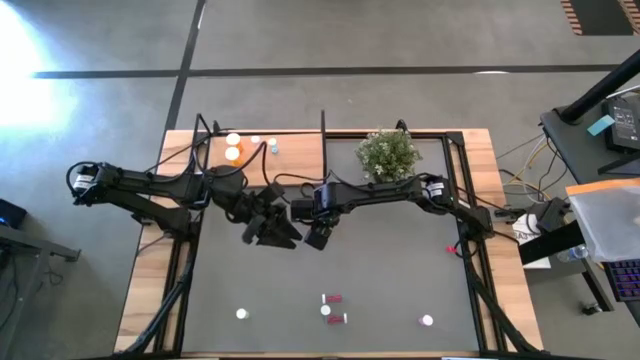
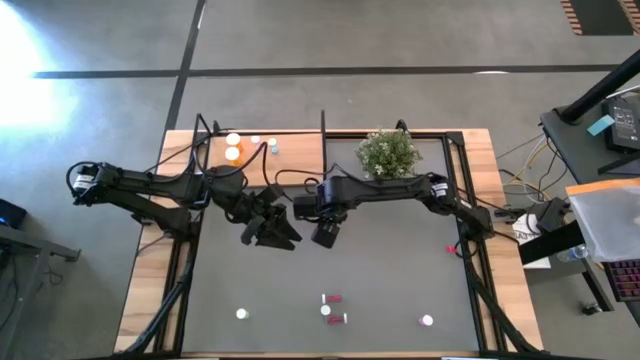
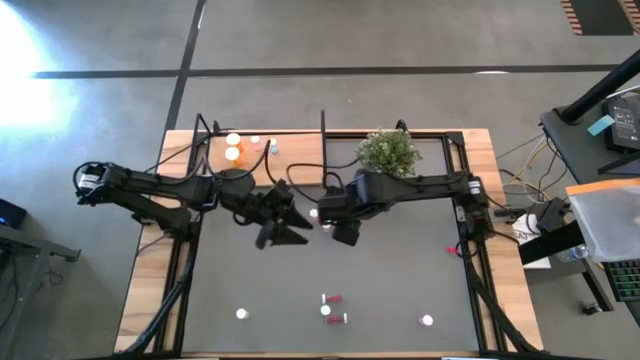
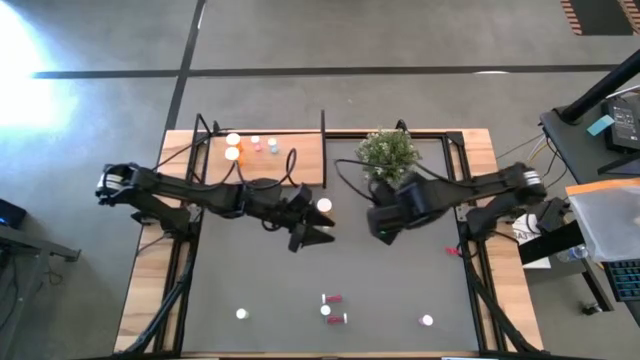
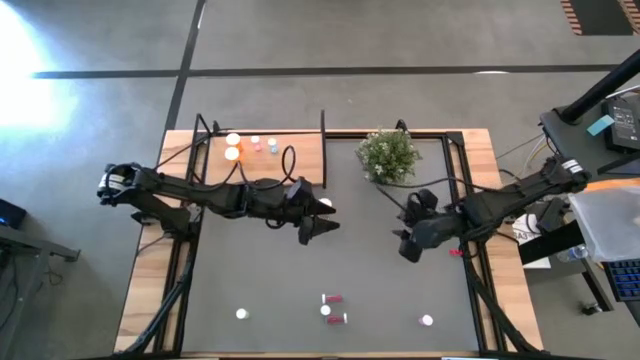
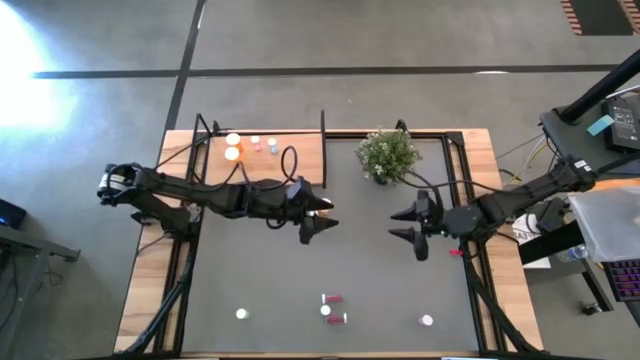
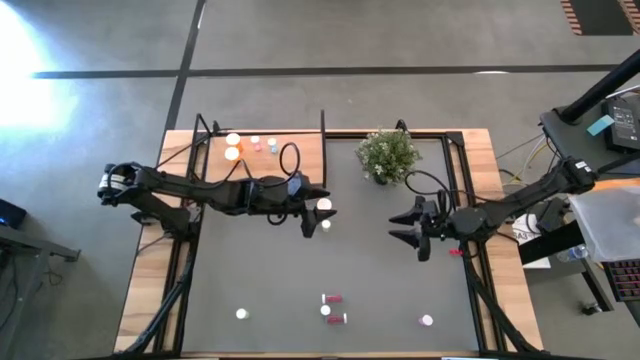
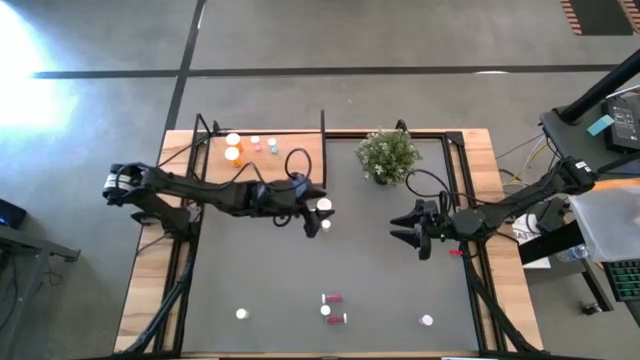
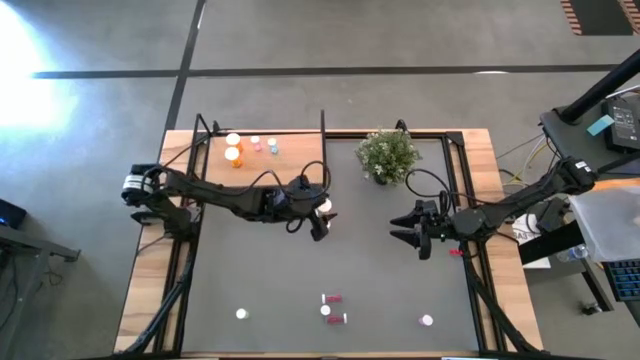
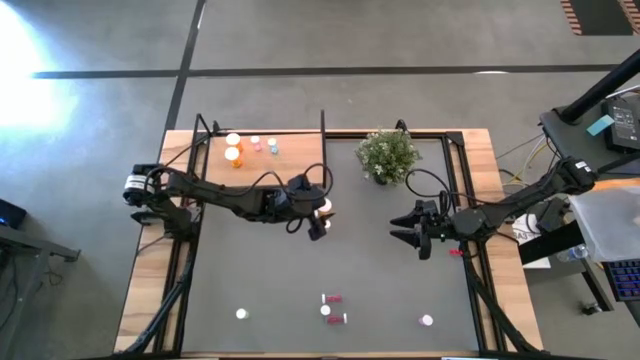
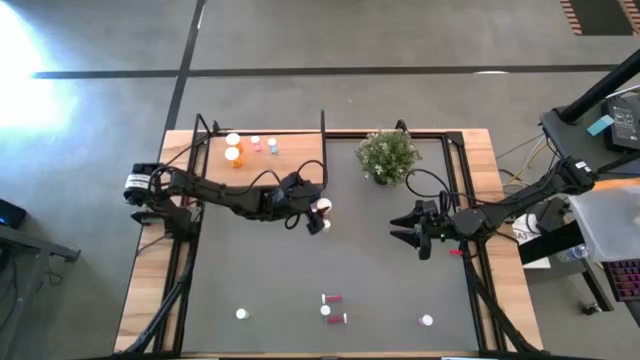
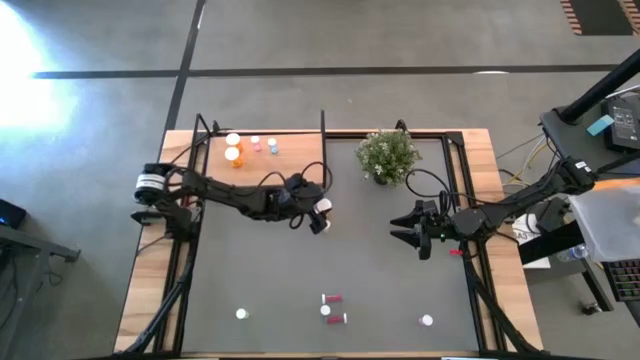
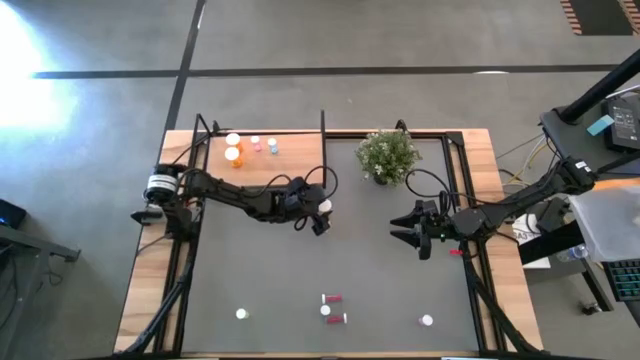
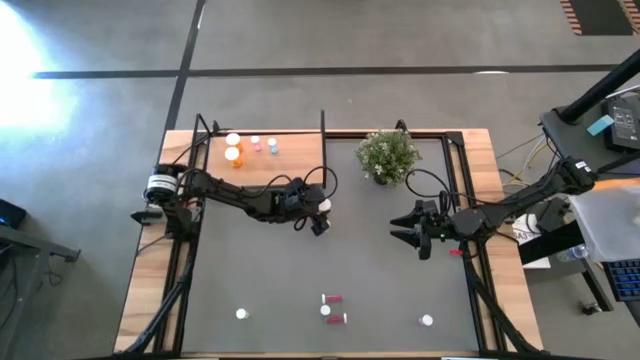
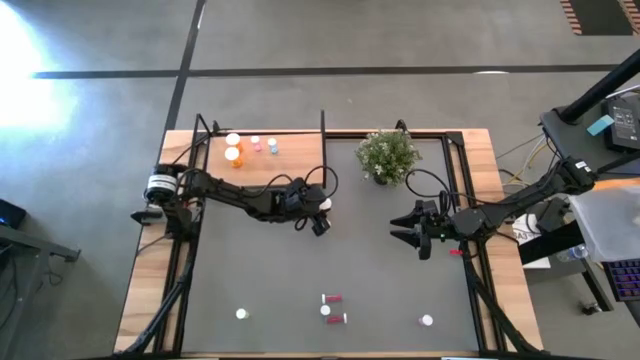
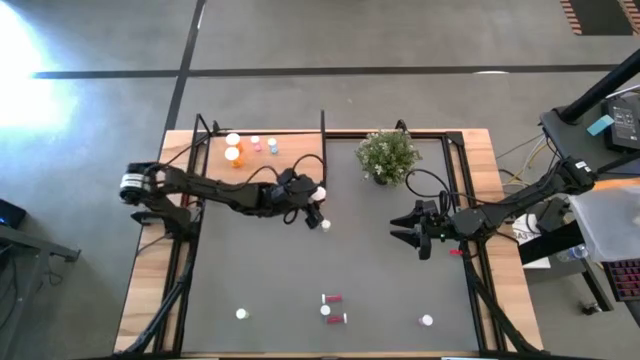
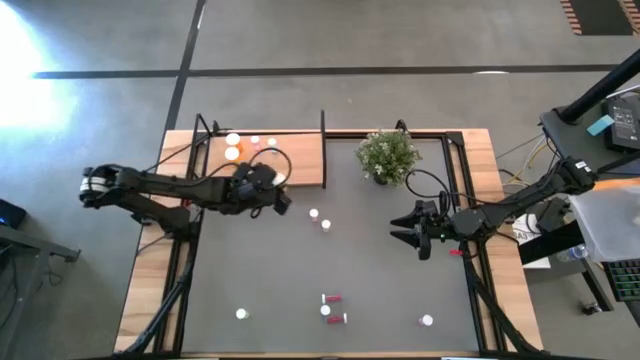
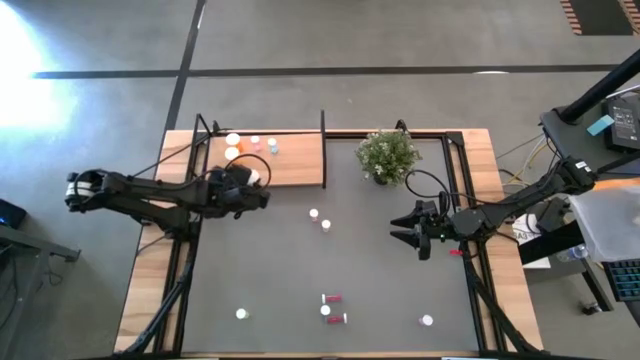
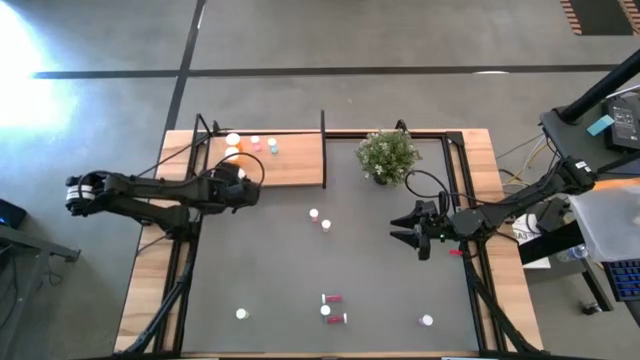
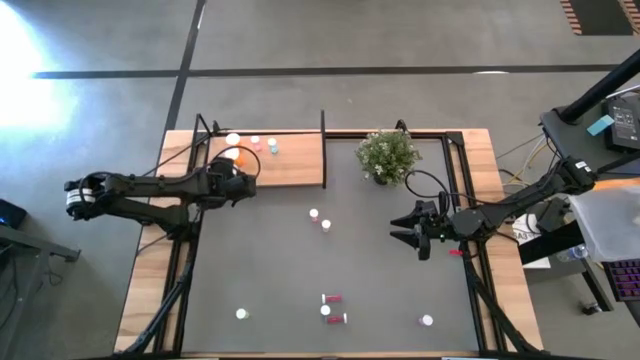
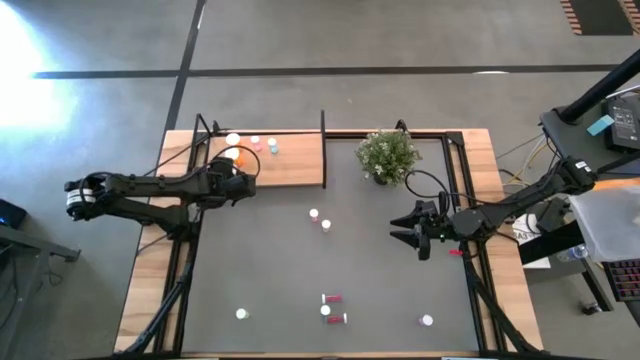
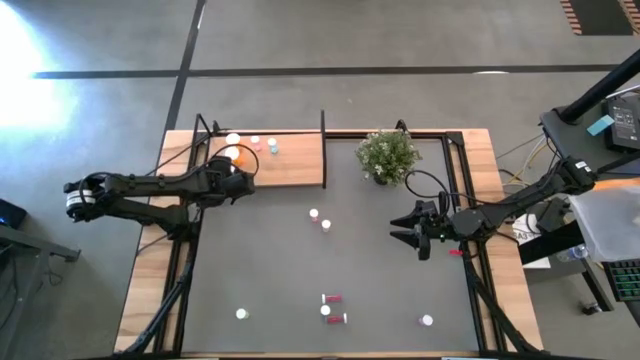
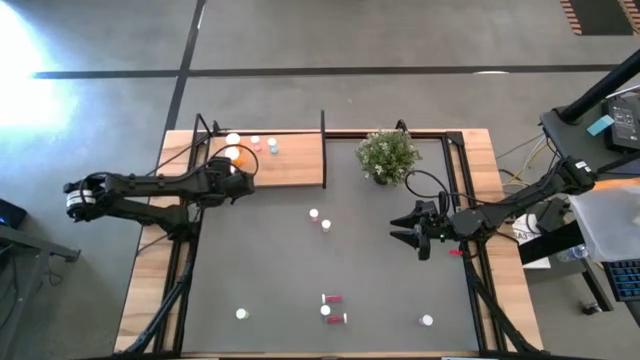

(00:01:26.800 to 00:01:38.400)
Task: Pick and place medicine bottles onto shelf by color
Put the large orange pill bottle on the shelf aligned with the other large orange pill bottles

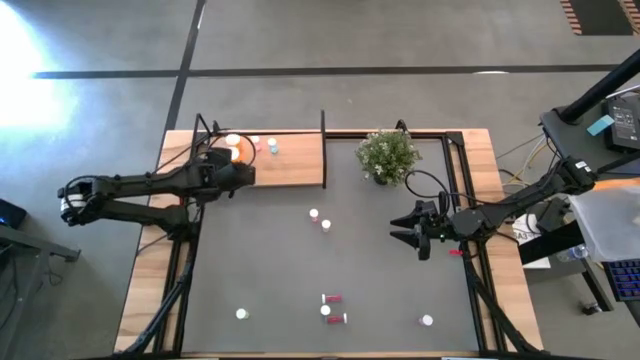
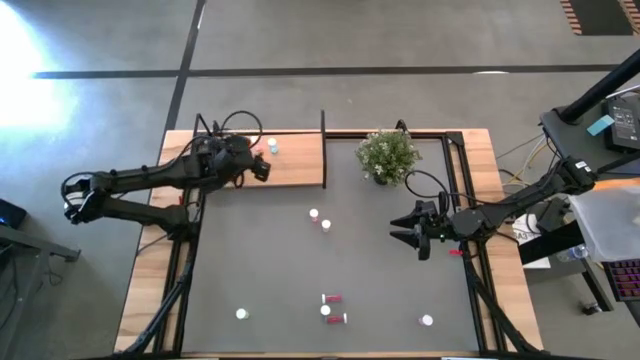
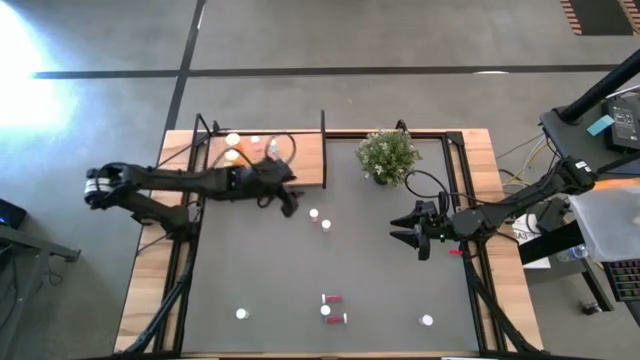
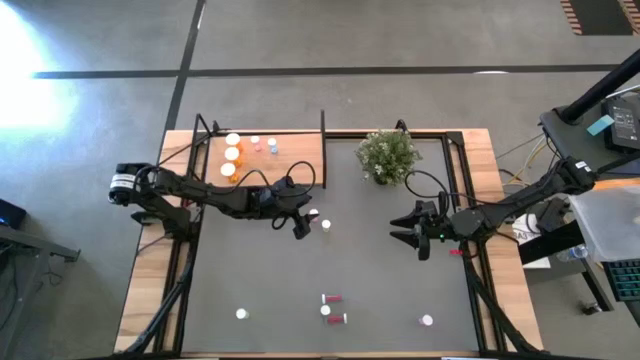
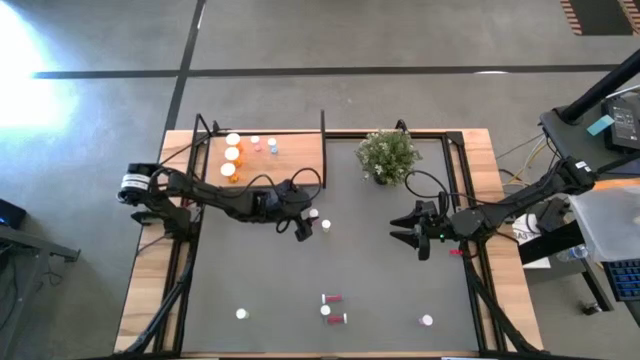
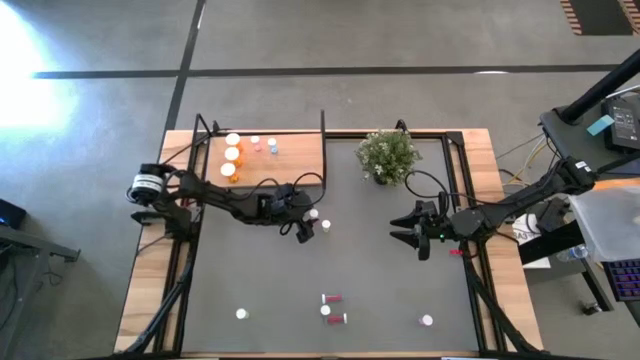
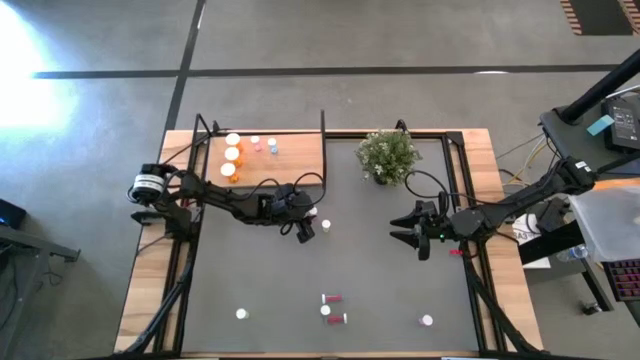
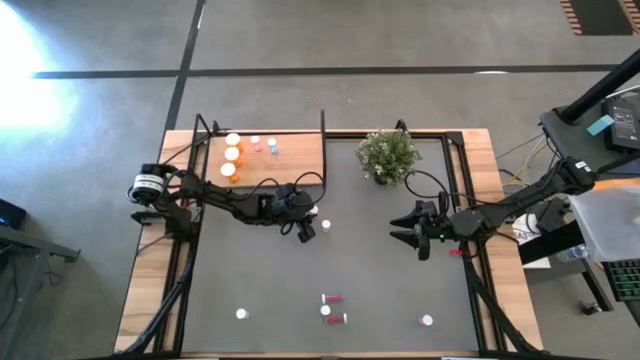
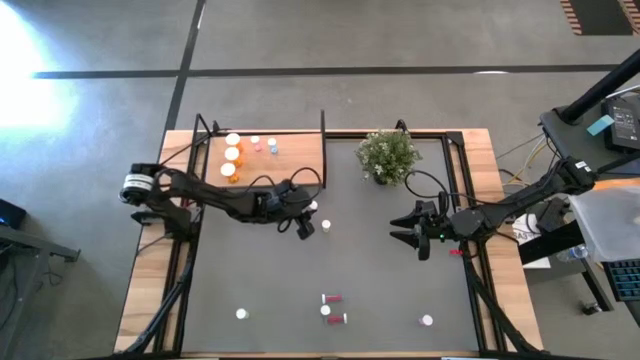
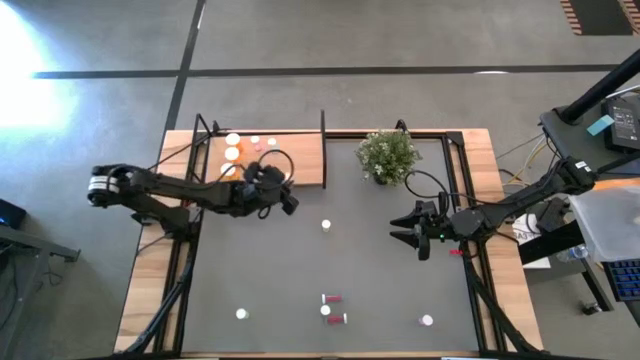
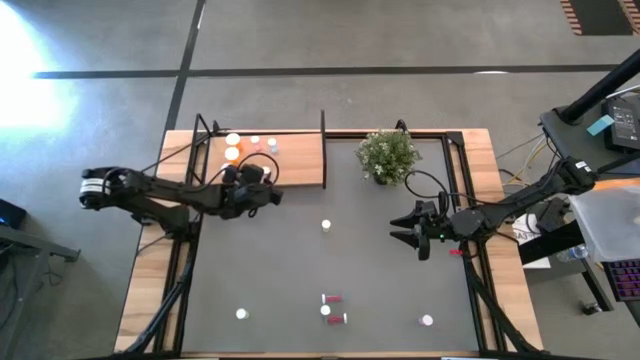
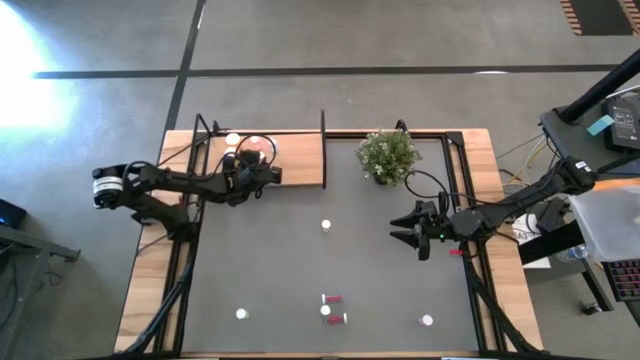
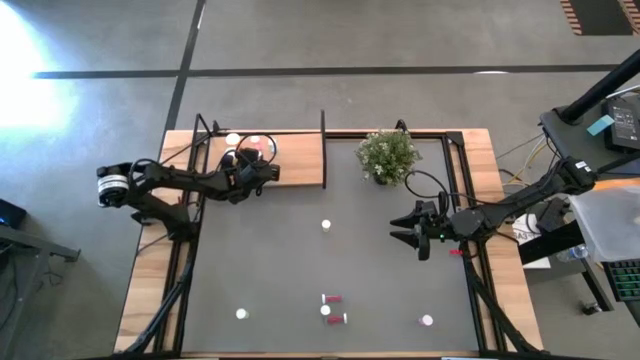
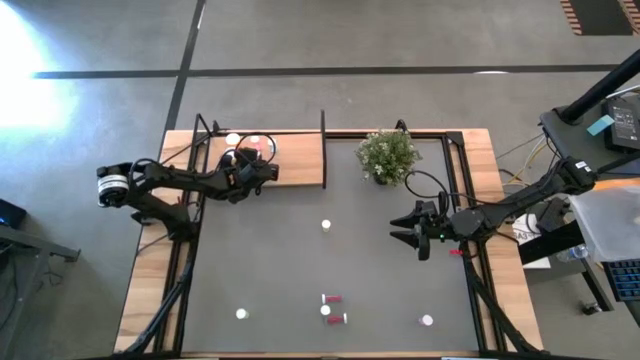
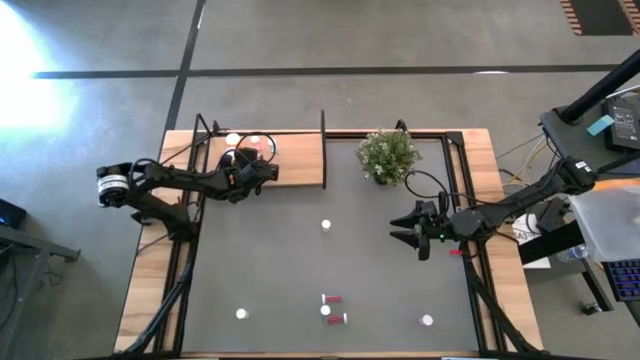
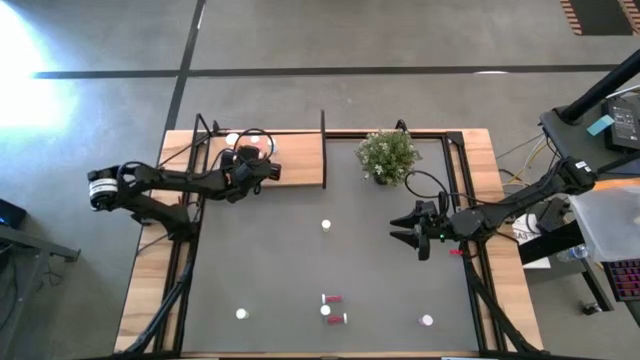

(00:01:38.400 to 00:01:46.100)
Put the top small pink bottle on the shelf aligned with the other small pink bottle

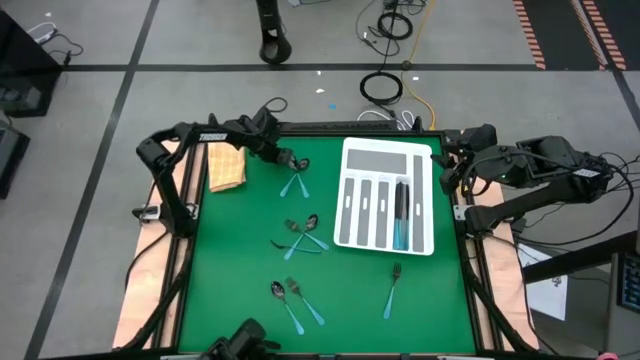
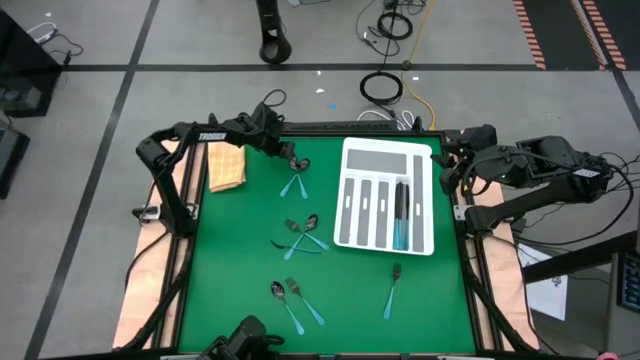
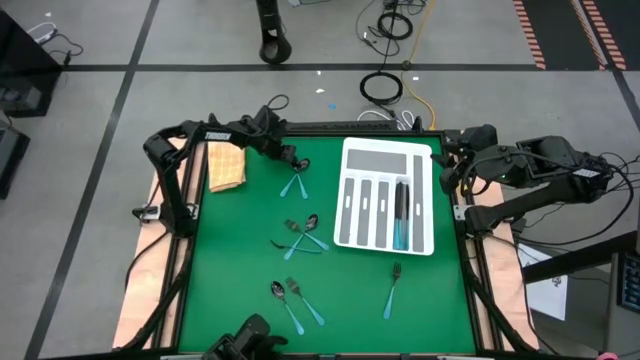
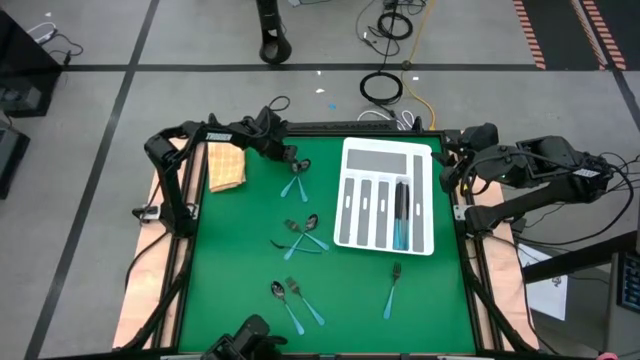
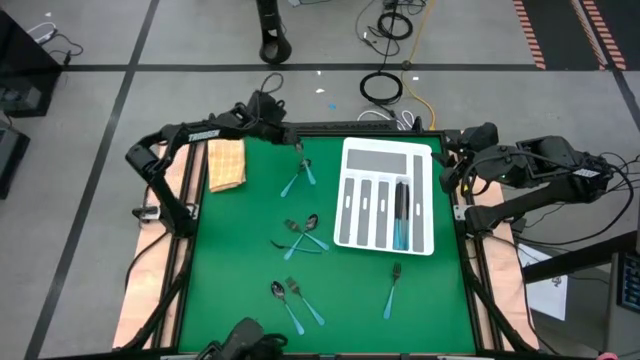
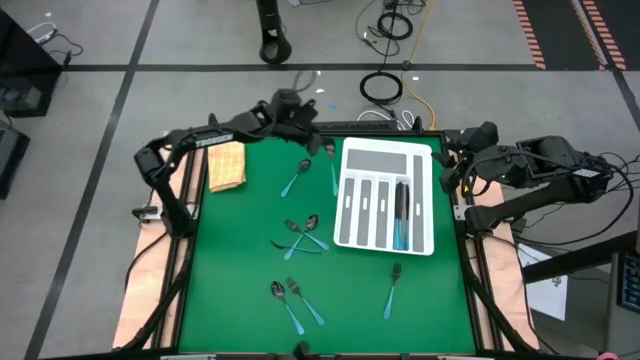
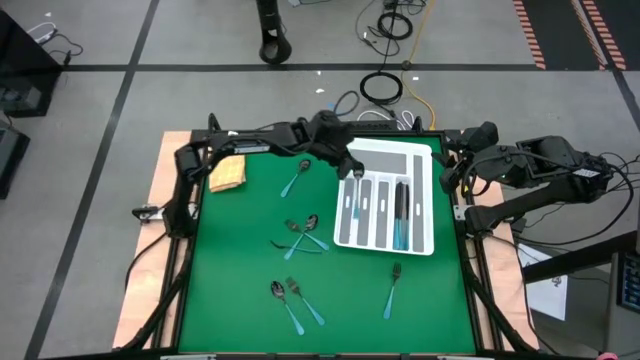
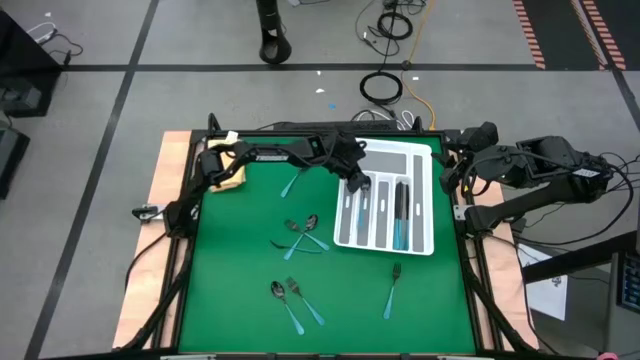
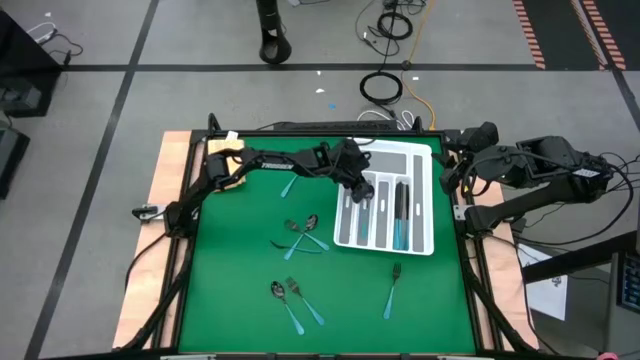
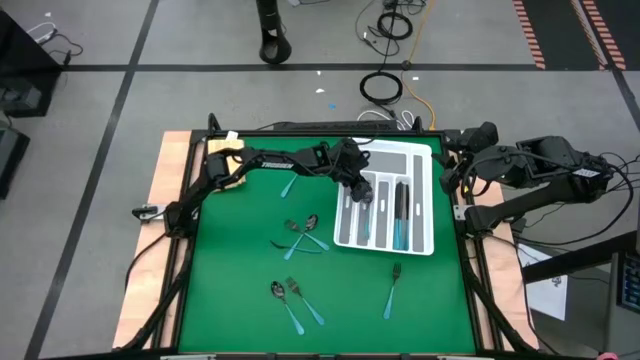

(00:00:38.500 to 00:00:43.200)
Task: Sort silverware
Put the blue spoon into the silverware tray
